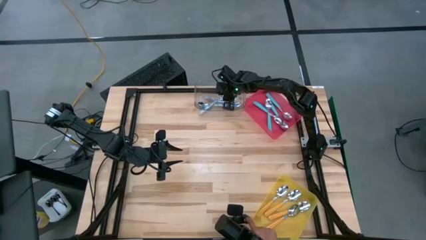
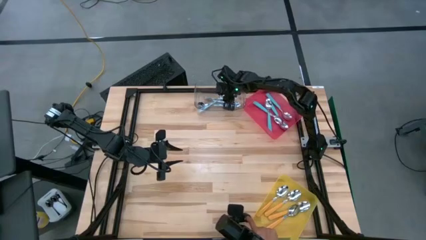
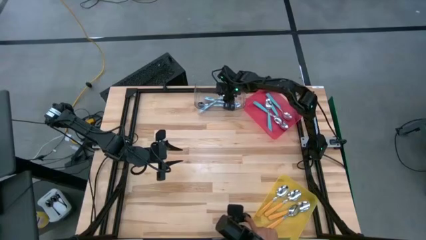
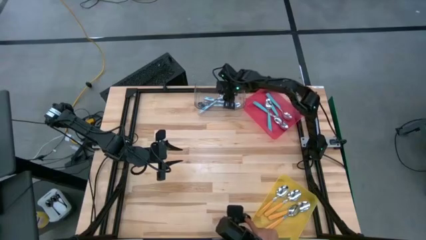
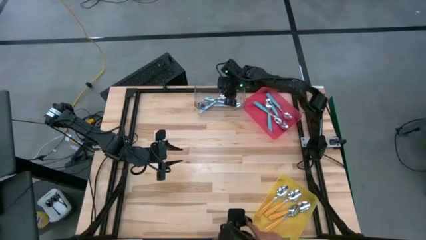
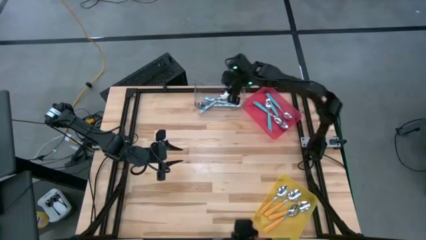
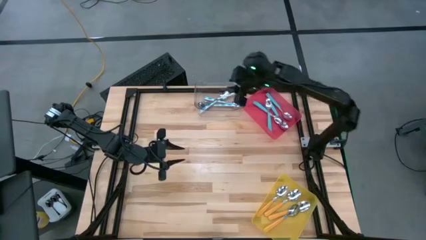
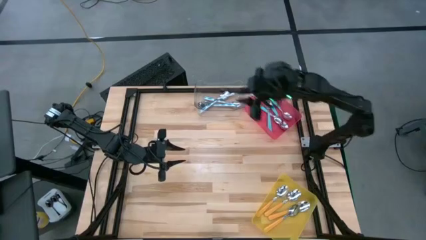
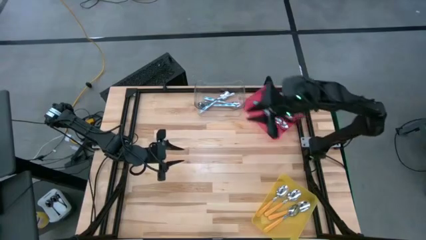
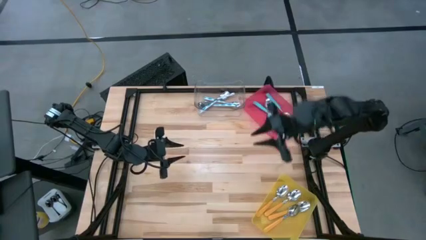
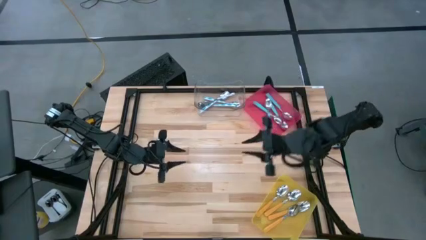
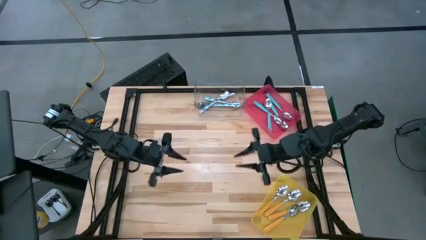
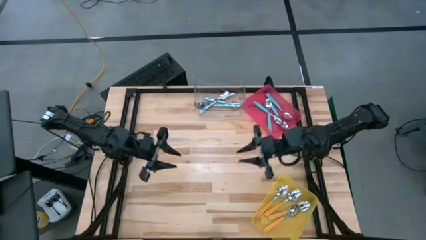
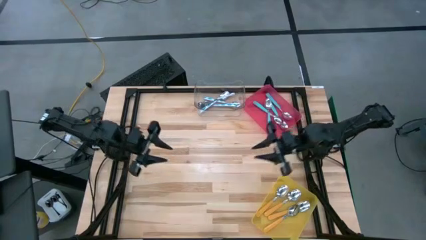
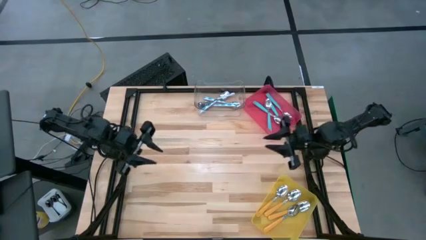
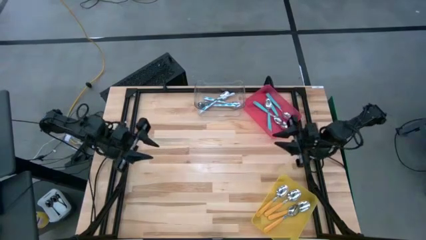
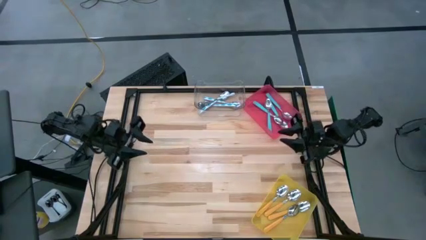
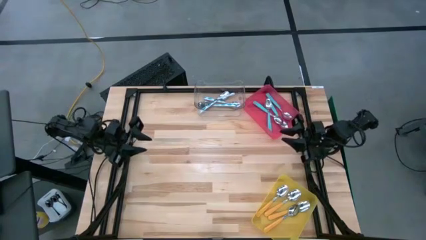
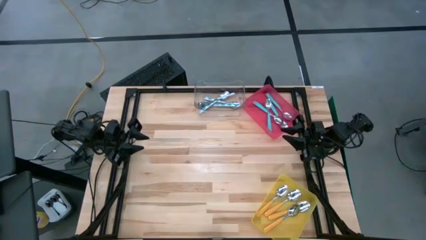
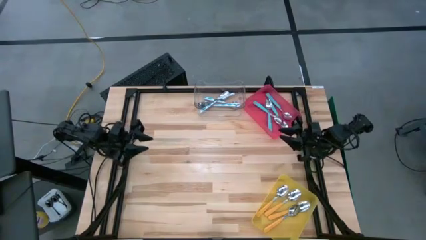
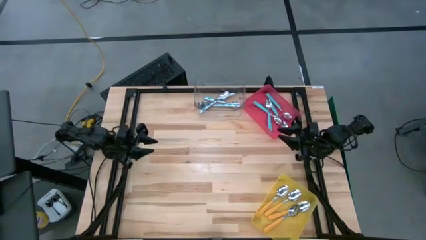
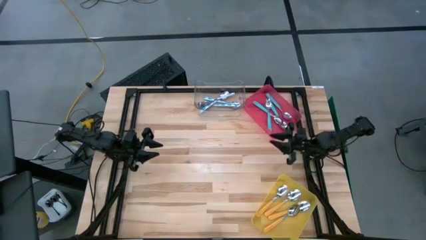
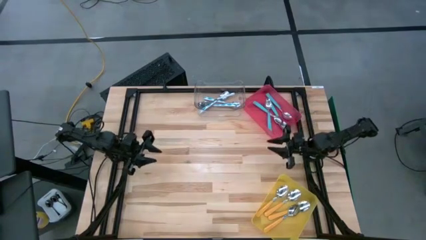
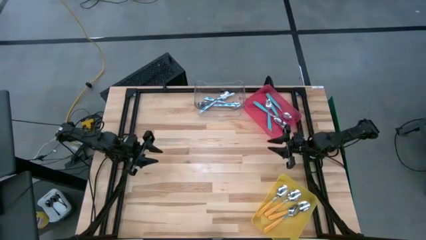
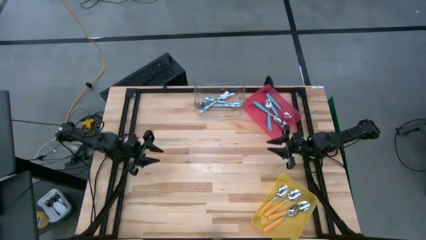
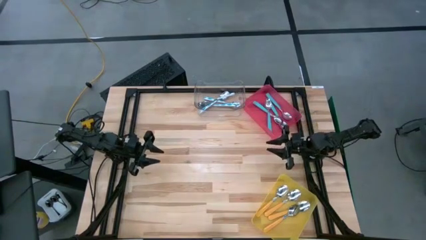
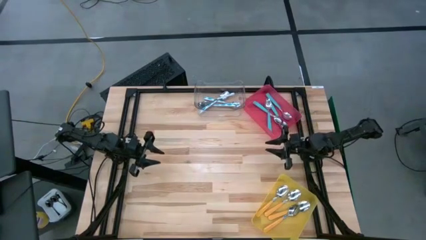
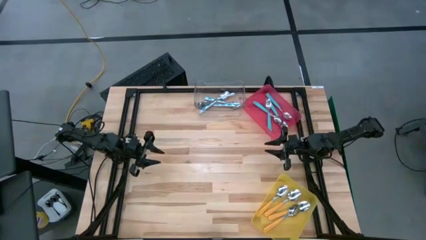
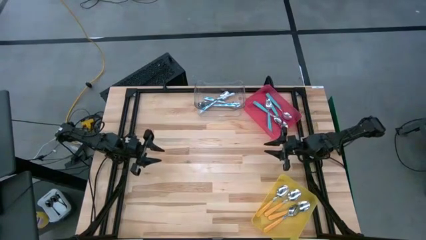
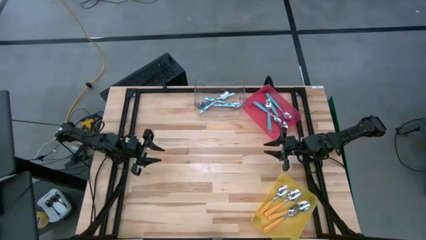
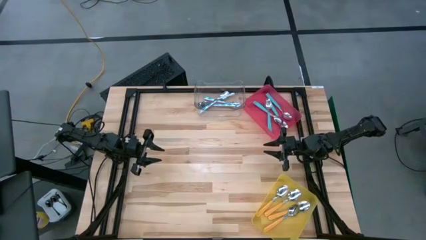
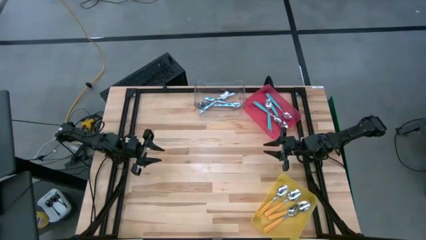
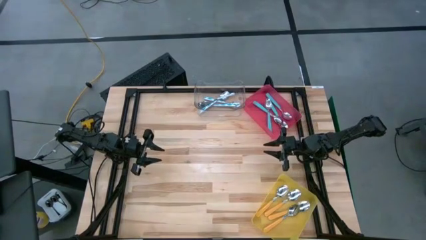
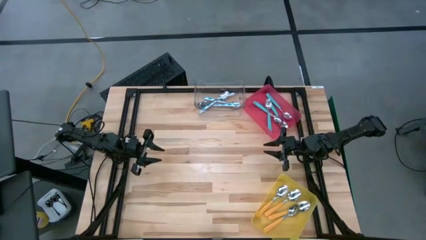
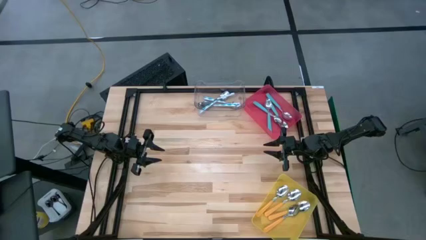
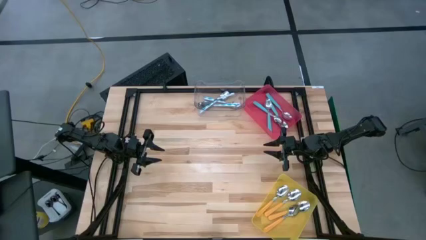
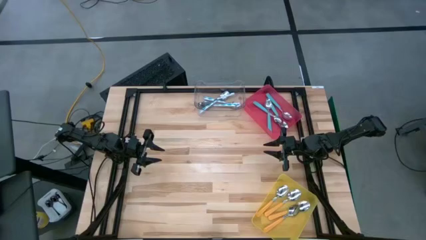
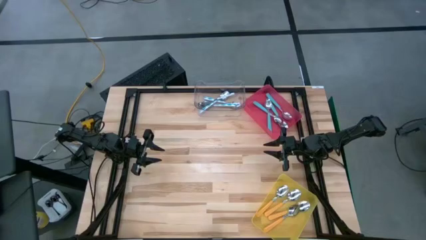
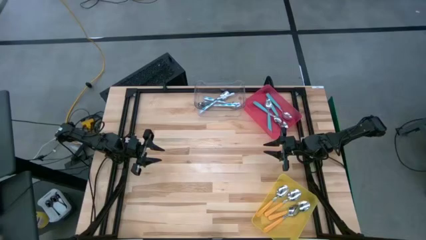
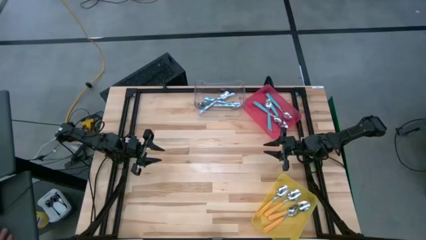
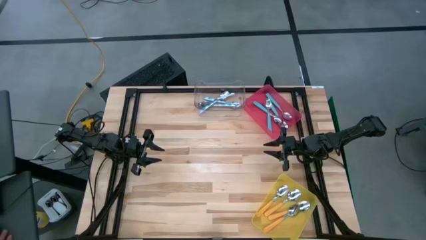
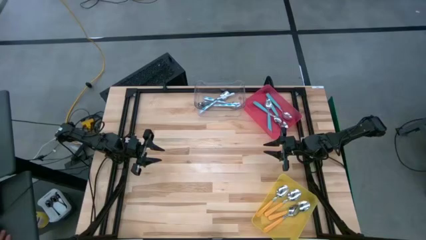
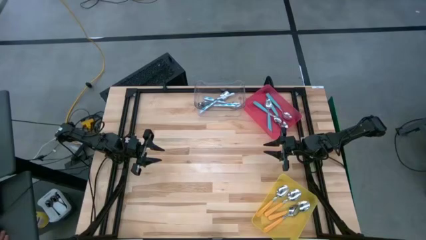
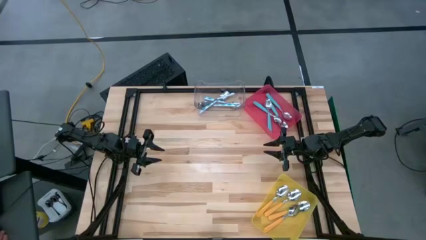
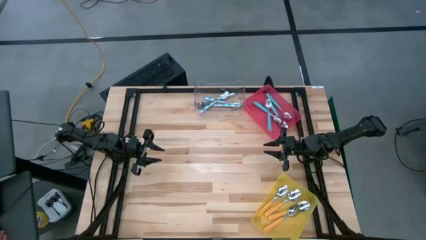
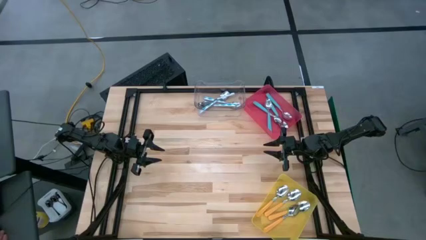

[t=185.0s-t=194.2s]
Task: Sort silverware by color (type)
Return to Home Position

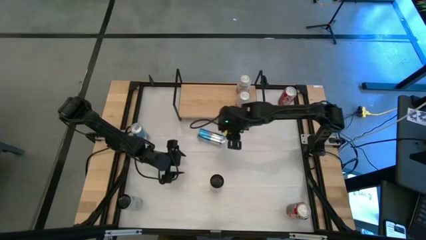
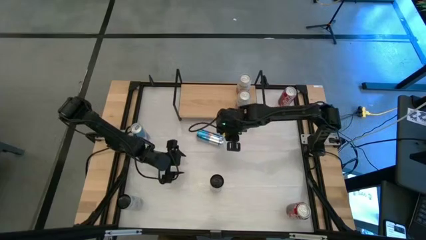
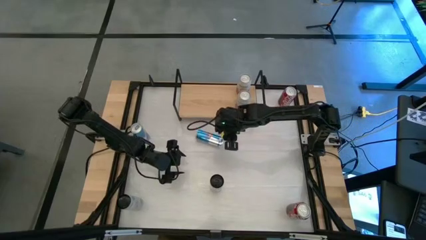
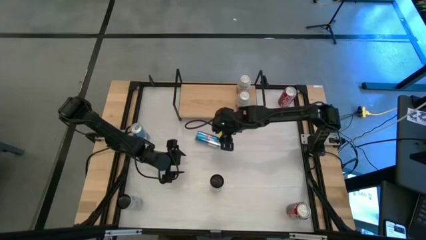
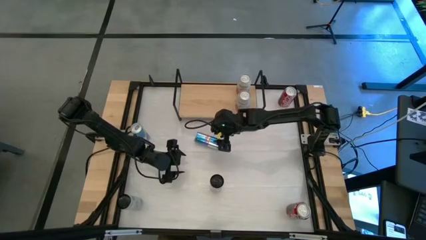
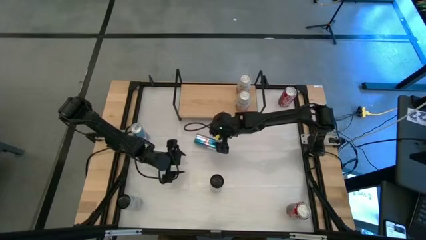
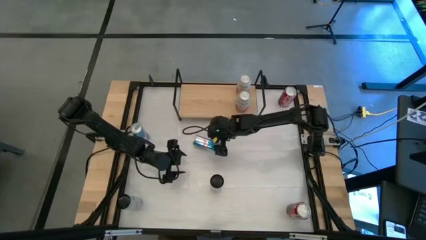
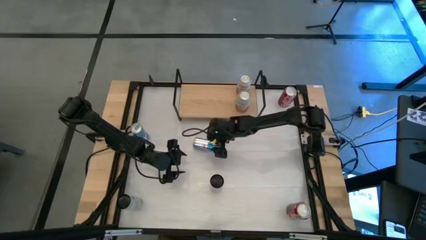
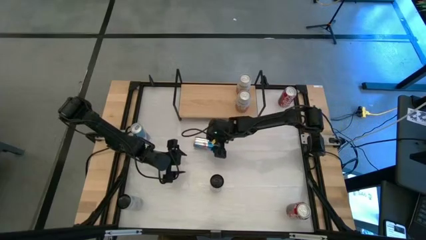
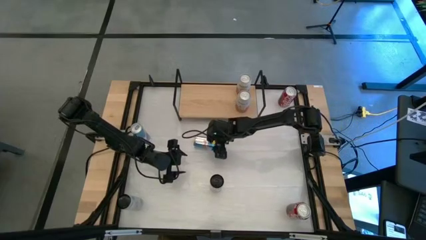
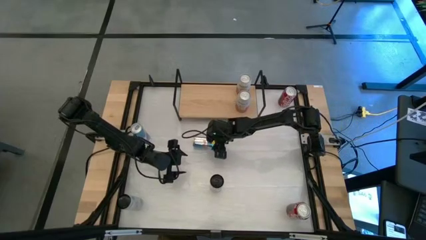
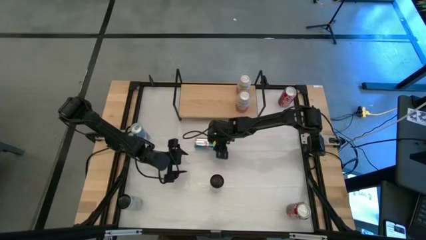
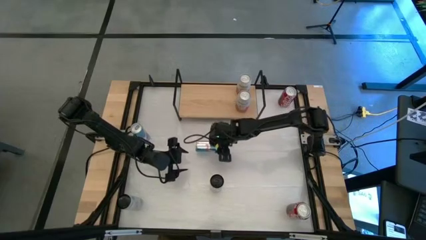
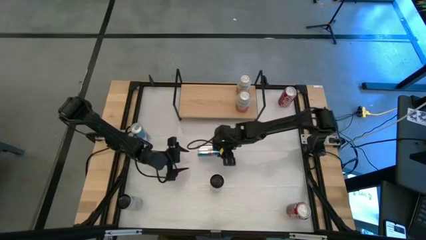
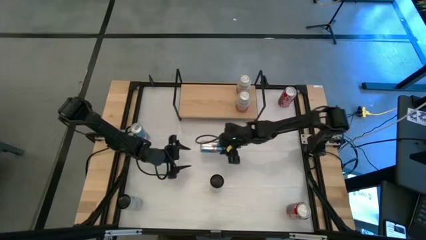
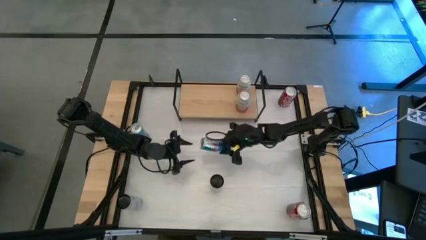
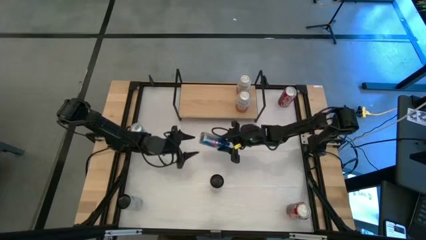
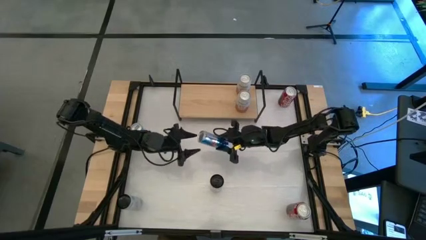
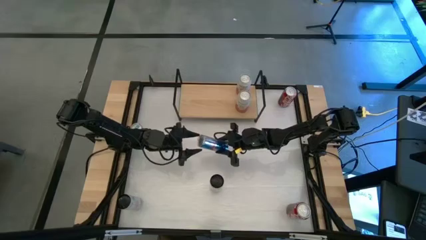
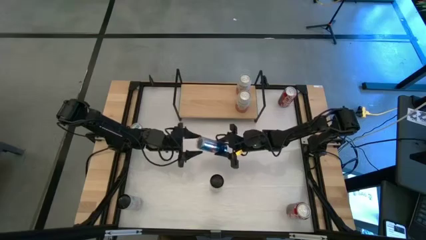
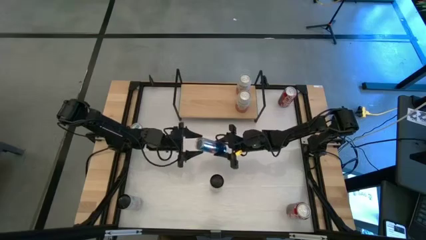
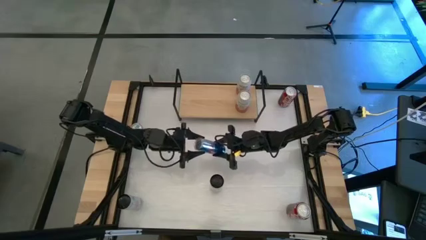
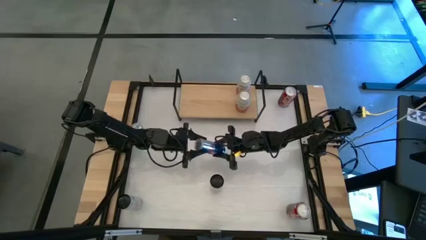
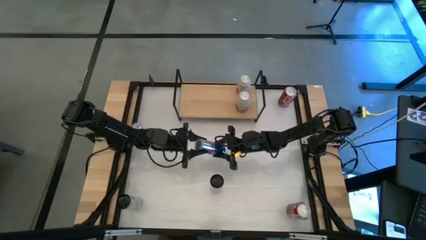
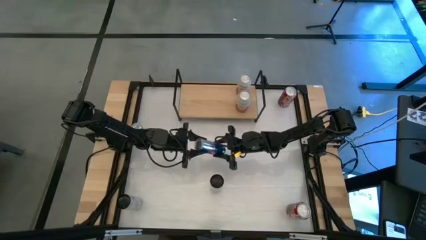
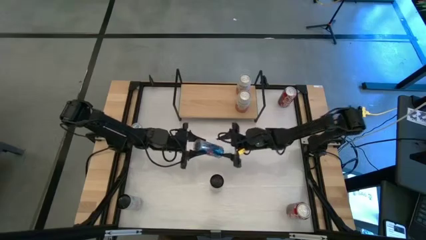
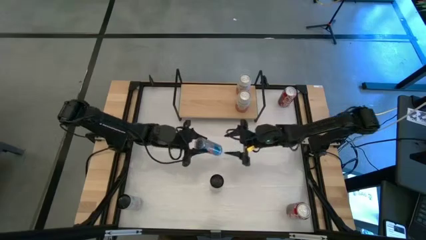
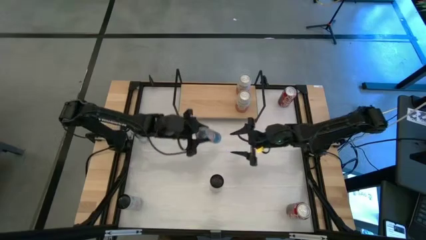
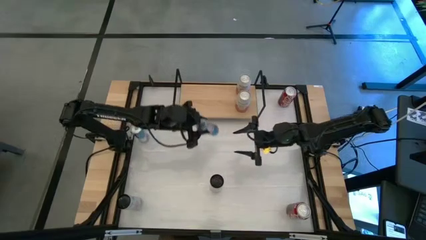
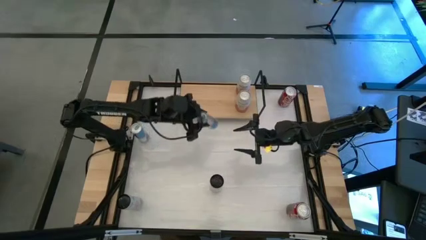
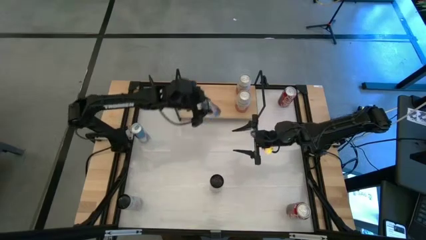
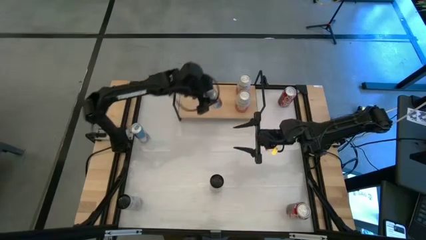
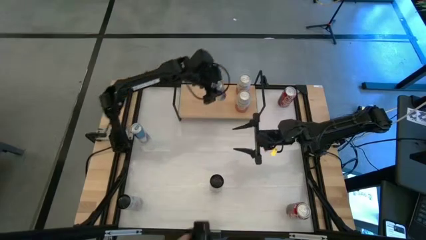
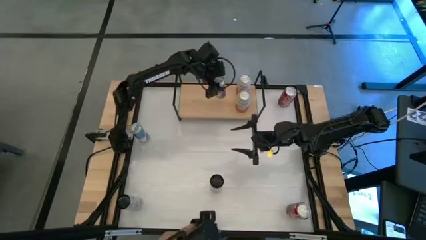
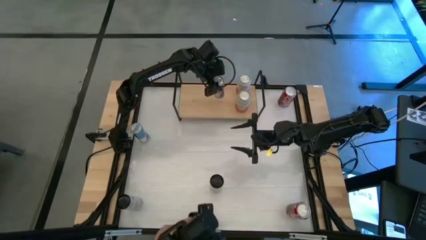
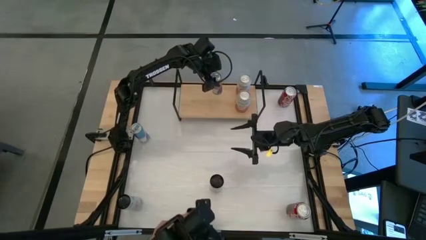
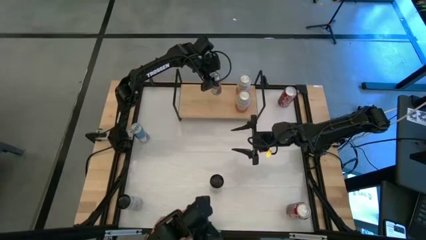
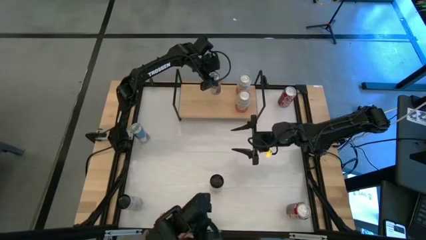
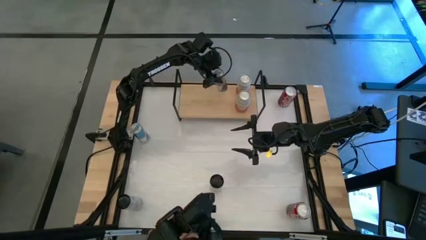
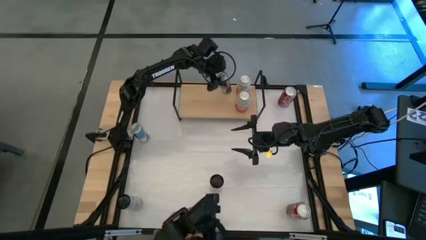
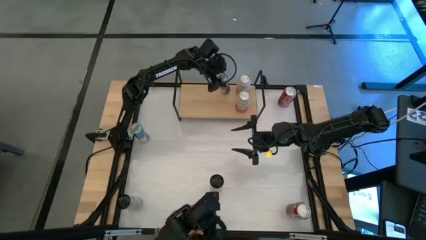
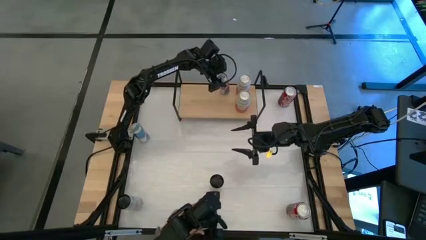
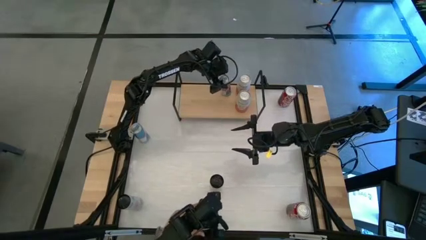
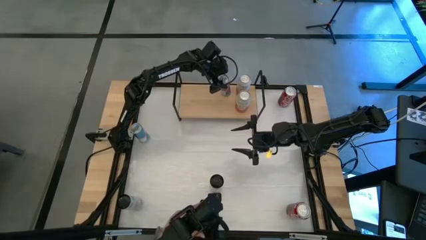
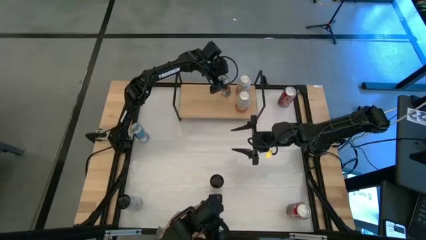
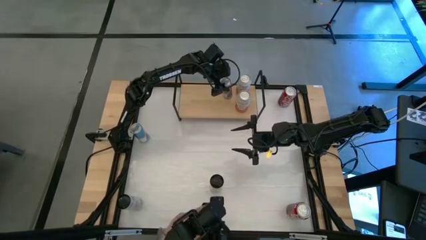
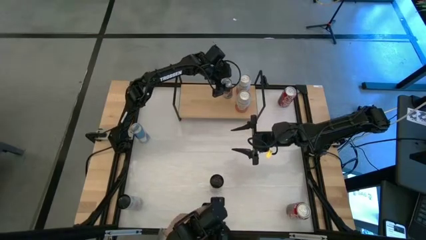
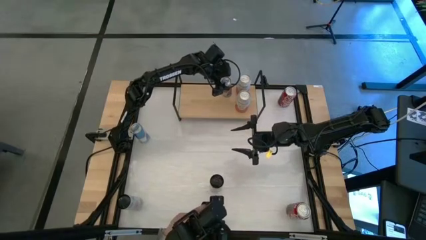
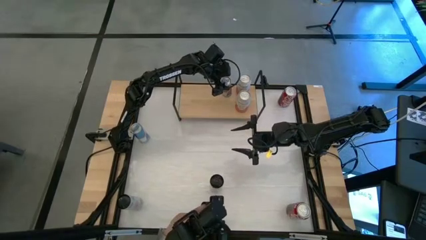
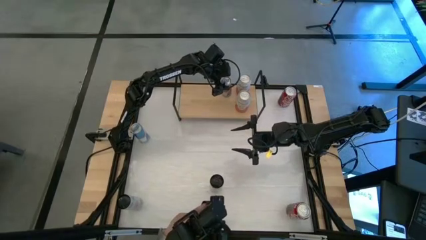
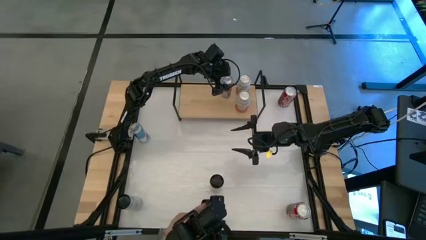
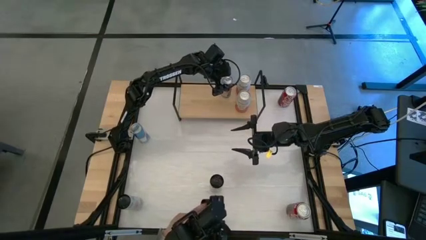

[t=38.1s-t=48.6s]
Task: Place canned beverage on shelf
Put the right blue soda can on the shelf
